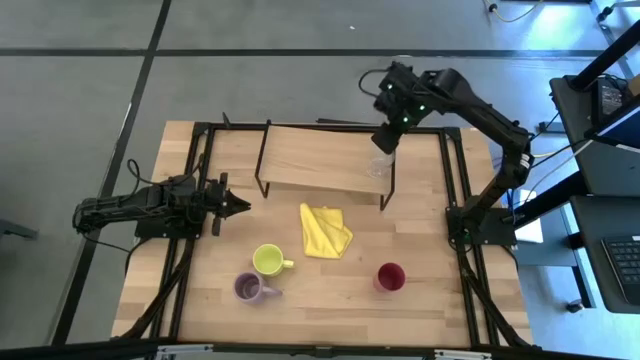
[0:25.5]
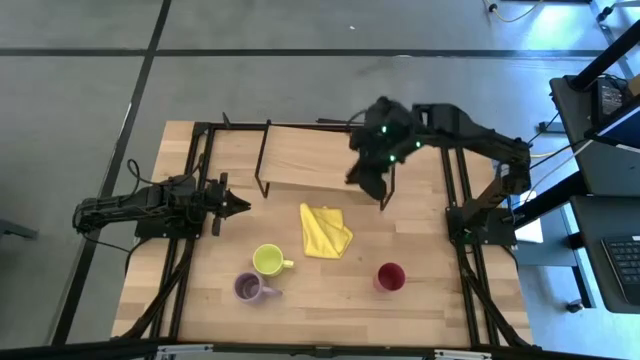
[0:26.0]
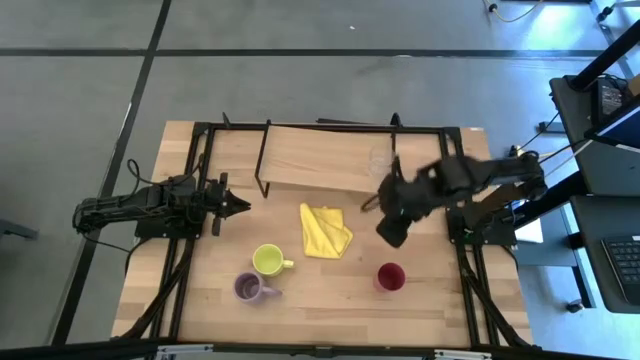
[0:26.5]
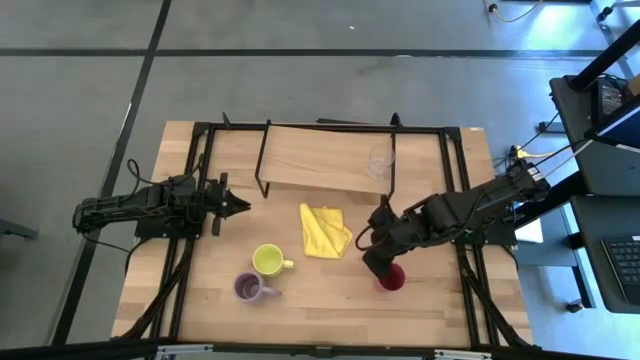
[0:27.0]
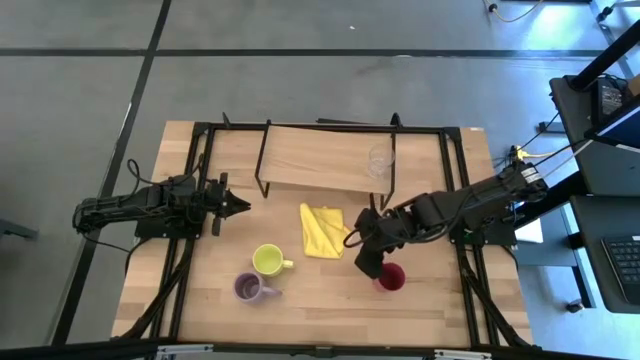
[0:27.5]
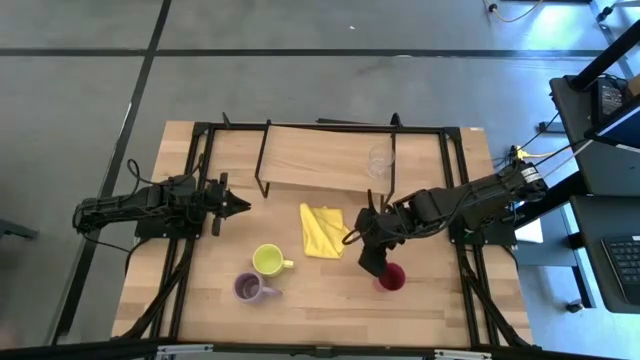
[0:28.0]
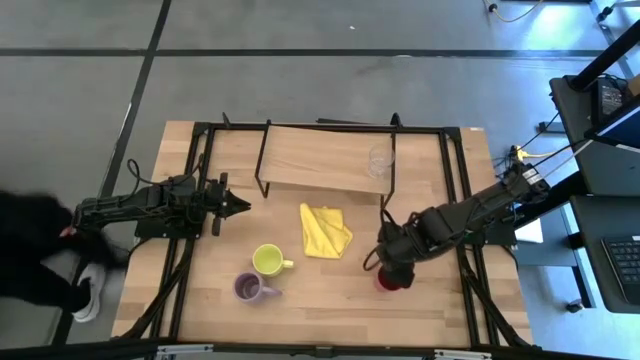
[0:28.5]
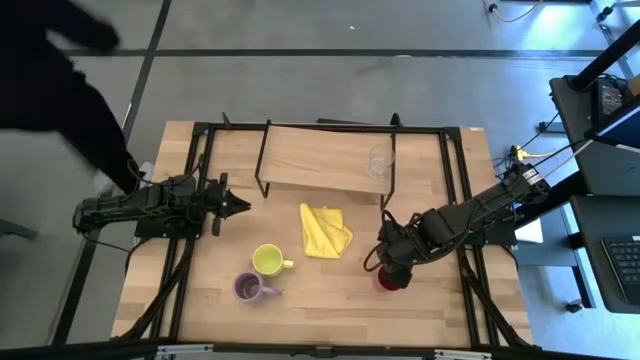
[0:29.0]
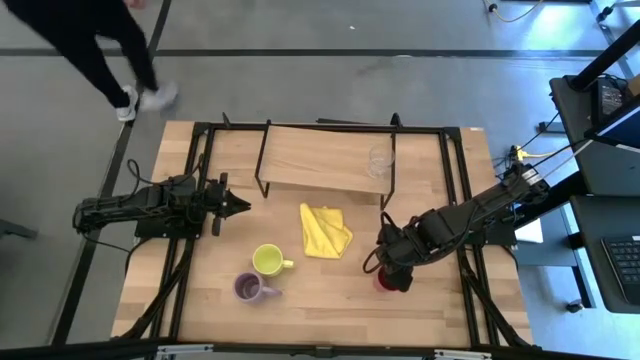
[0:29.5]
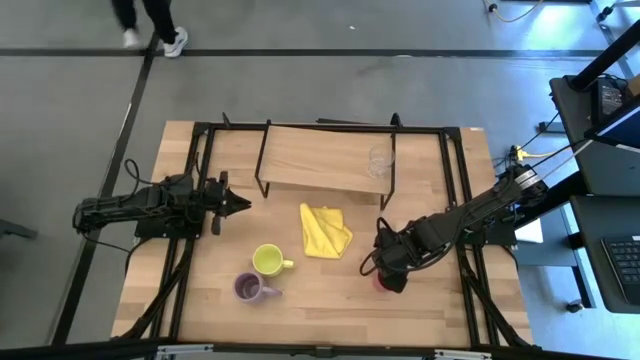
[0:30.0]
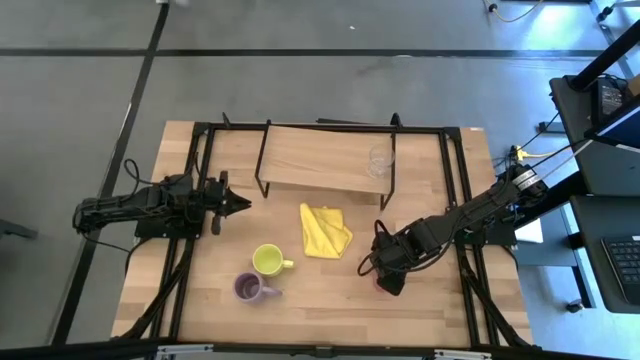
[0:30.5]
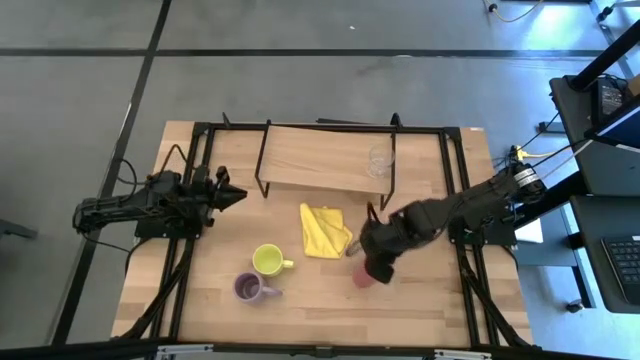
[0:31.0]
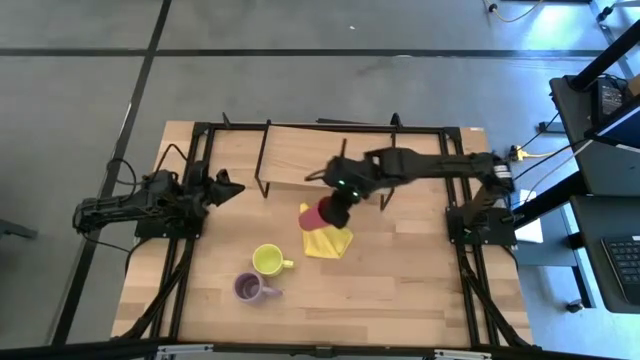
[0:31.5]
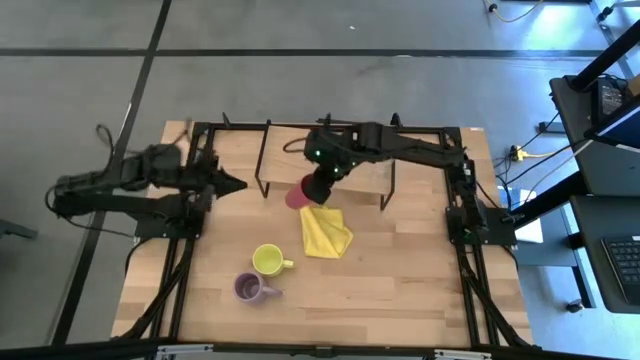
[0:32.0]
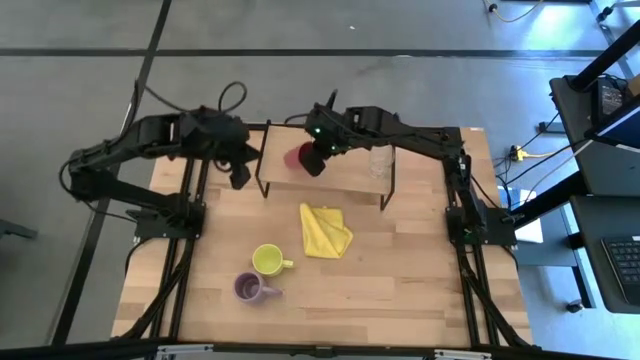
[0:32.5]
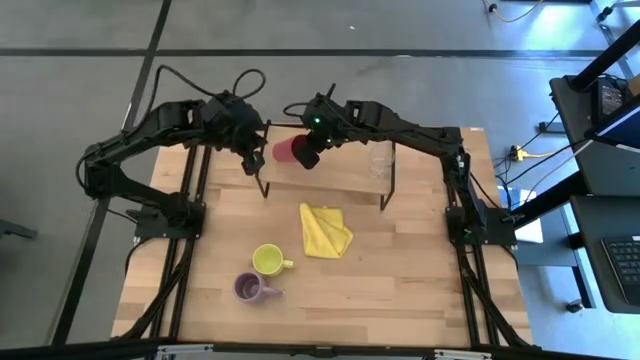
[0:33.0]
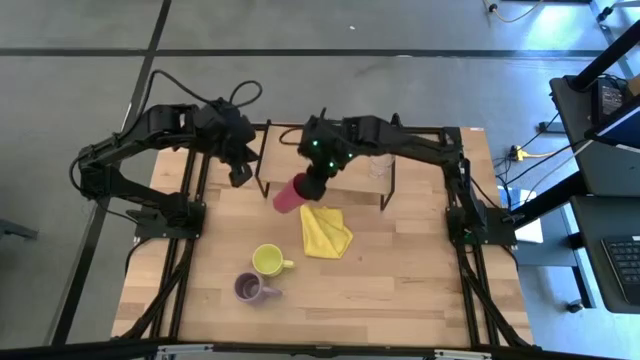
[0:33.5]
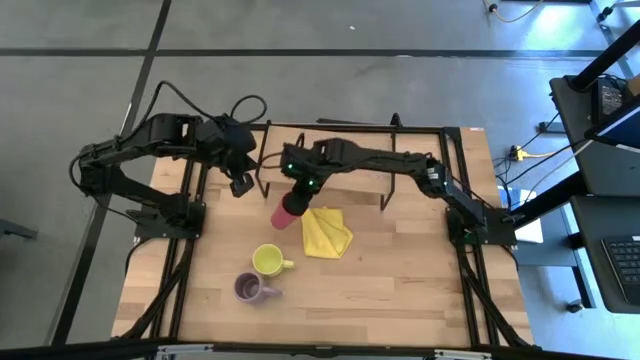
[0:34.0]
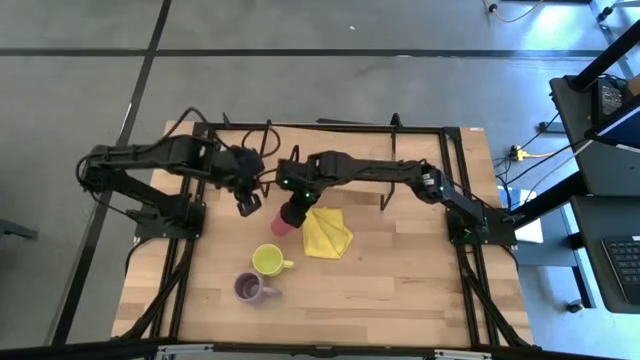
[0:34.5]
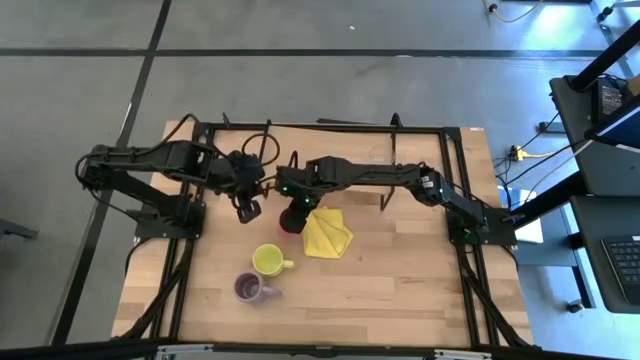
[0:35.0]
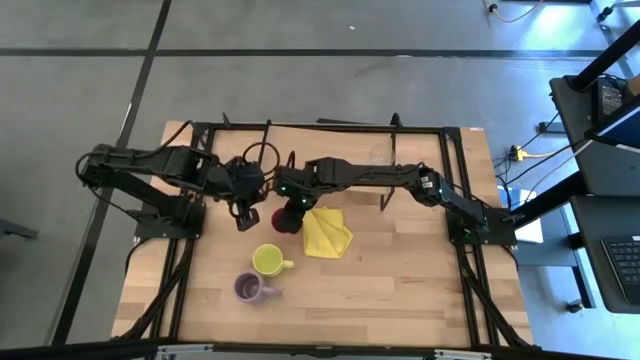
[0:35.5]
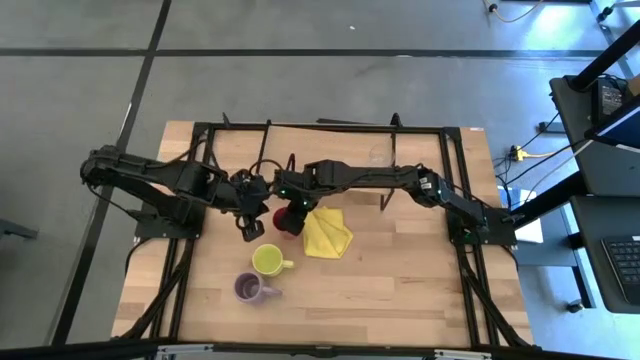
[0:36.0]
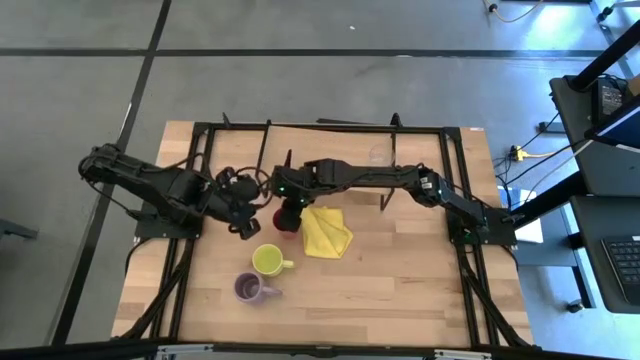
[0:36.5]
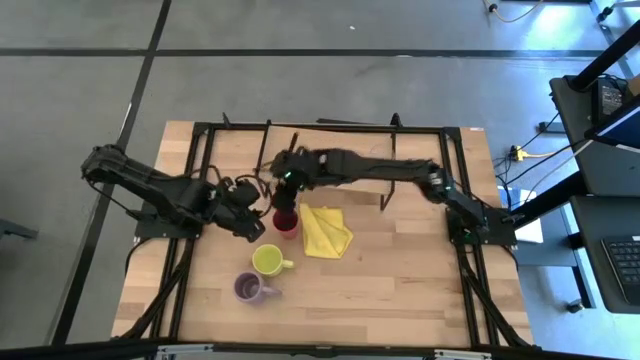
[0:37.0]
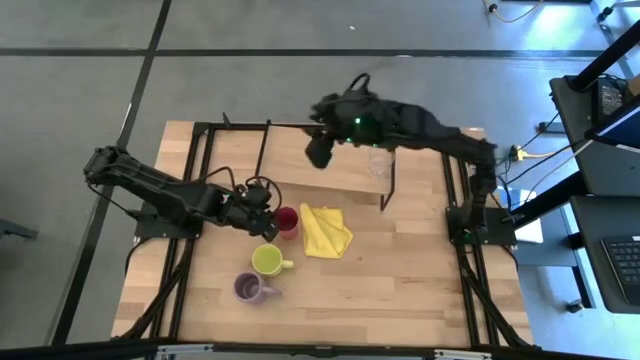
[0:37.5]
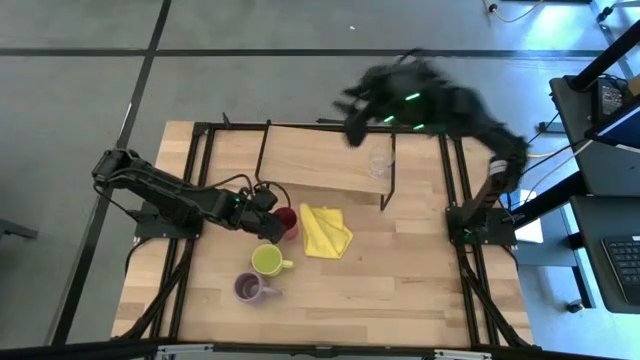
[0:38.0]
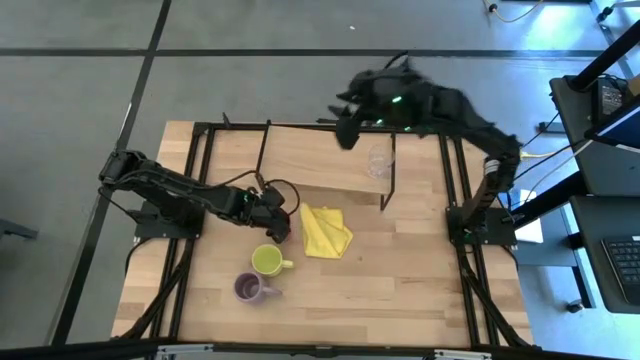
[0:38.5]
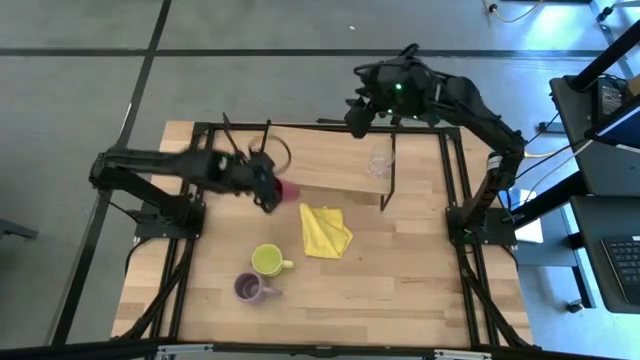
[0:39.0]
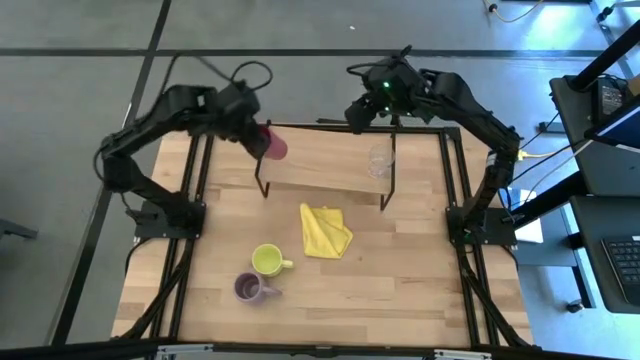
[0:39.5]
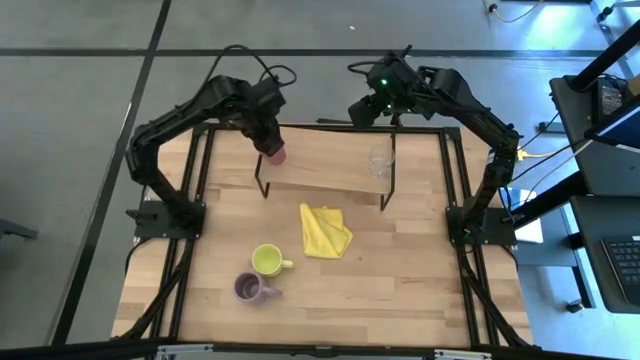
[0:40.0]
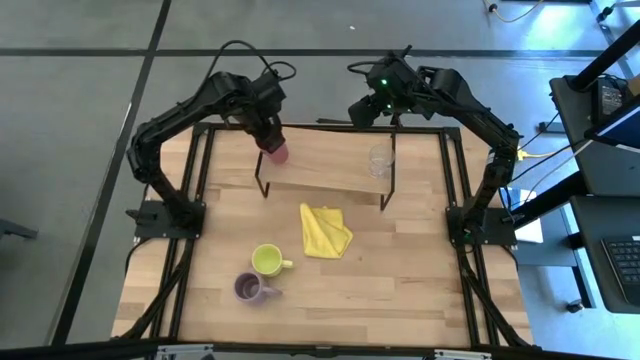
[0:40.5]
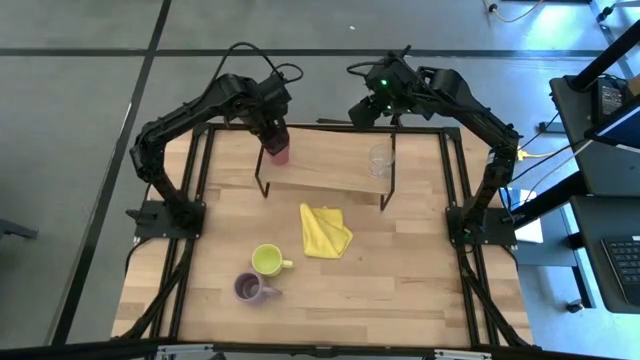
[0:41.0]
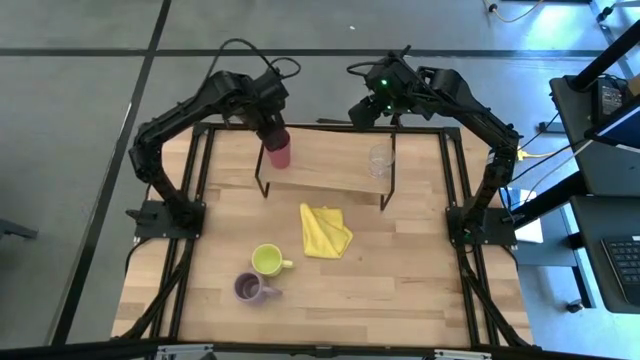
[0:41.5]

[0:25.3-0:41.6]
Task: Stack small to large cups/mugs on shelf
Put the pink cup to the left on the shelf

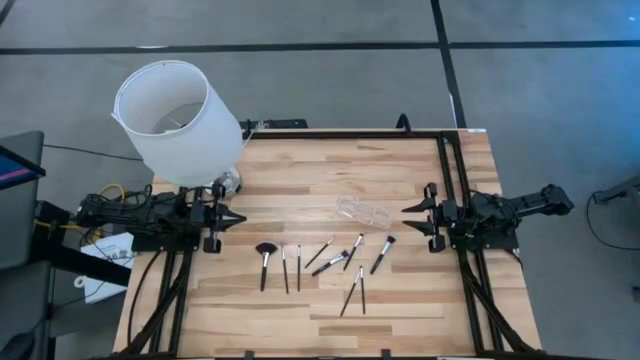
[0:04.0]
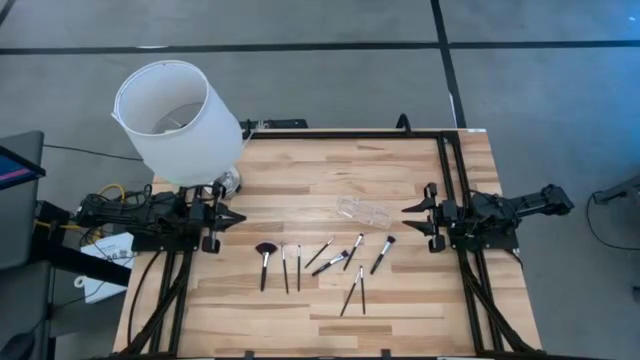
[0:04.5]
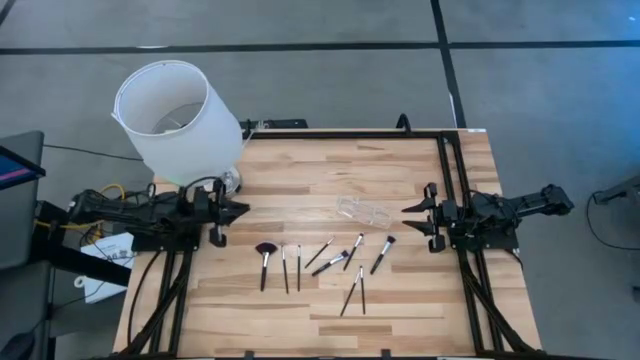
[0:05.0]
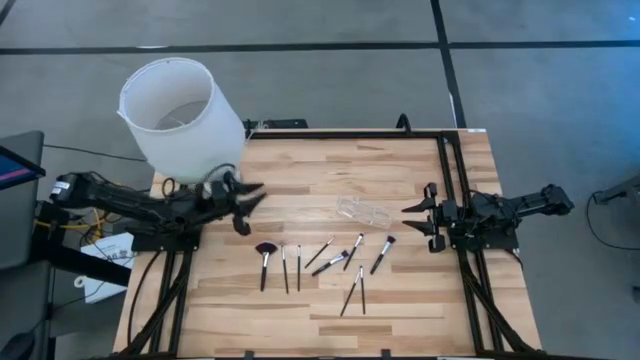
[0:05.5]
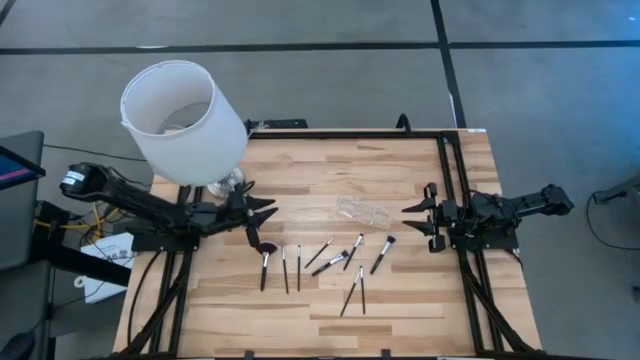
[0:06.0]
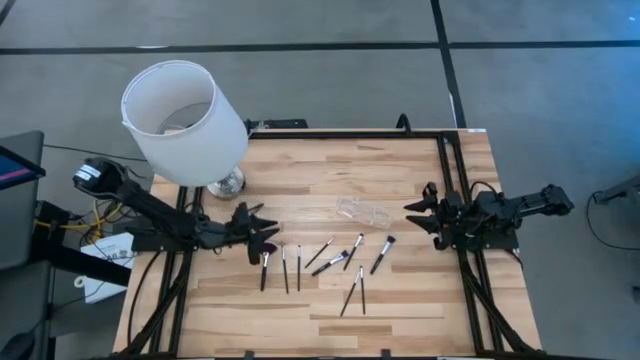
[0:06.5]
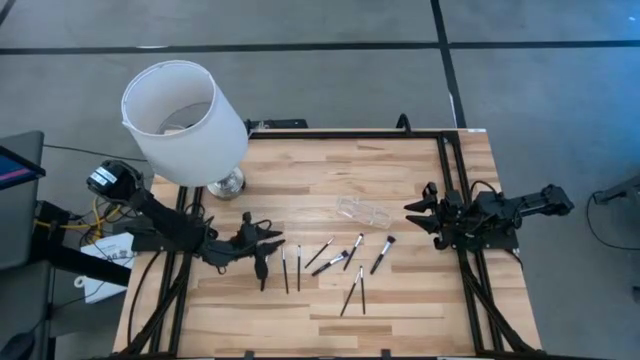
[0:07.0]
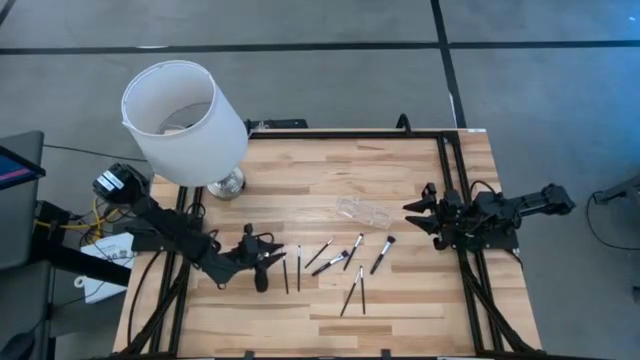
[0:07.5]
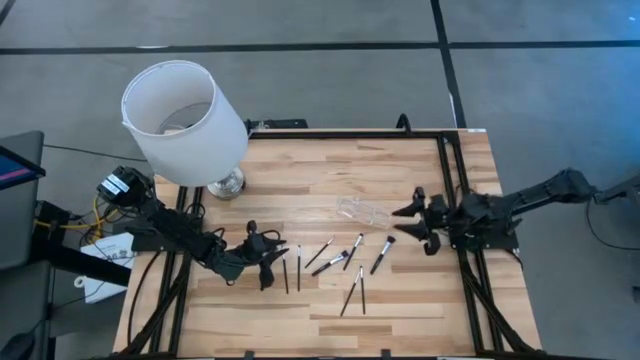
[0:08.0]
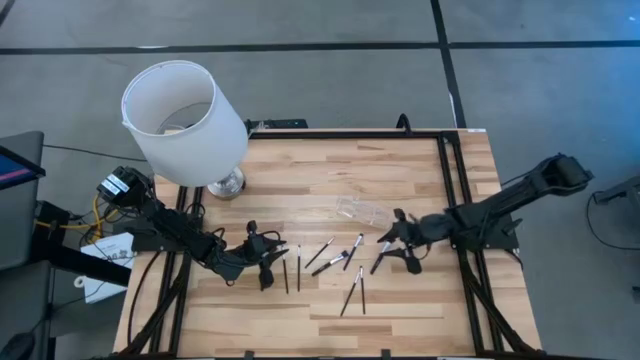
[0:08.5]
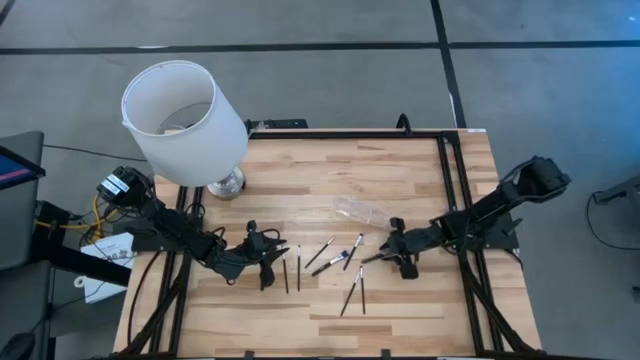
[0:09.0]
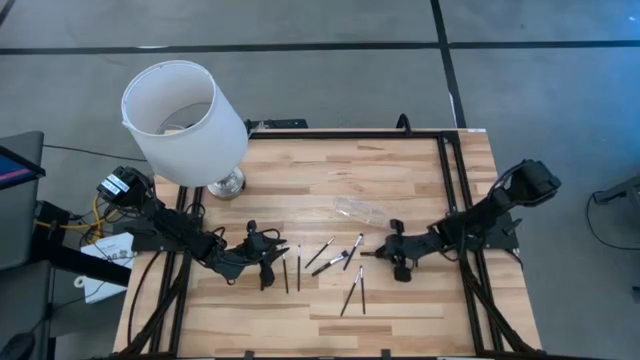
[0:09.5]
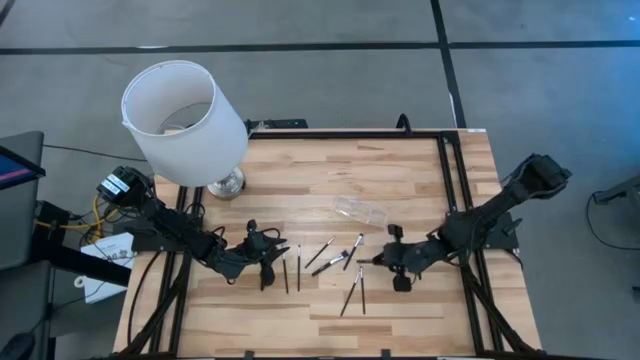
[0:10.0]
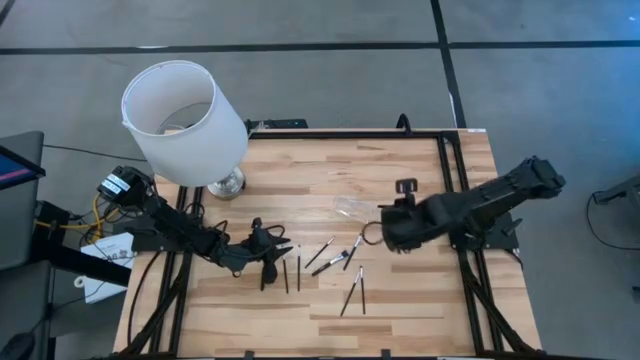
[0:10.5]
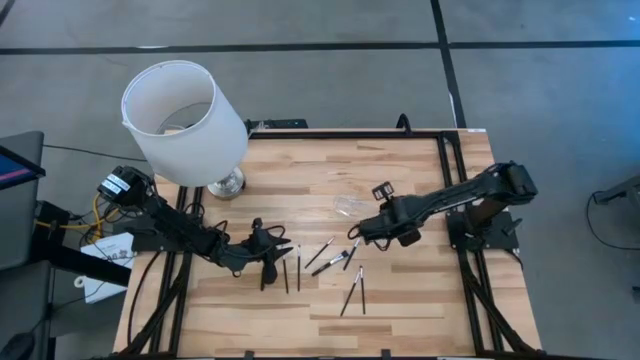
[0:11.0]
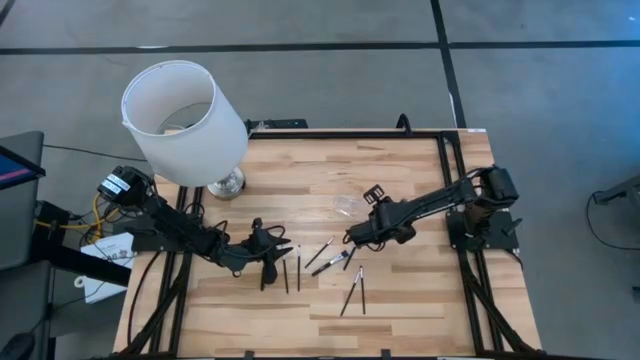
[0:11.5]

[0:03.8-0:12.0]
Task: Put items in baskets/containers
Put the black powder brush into the transparent organizer
